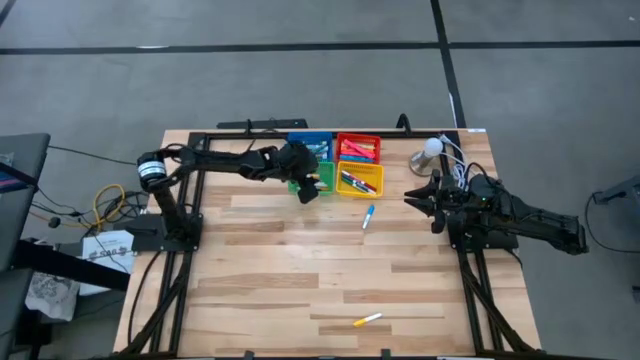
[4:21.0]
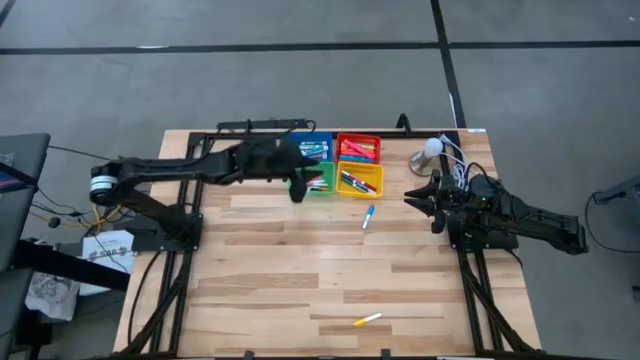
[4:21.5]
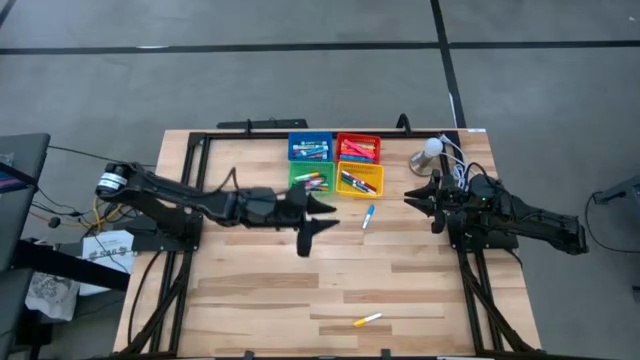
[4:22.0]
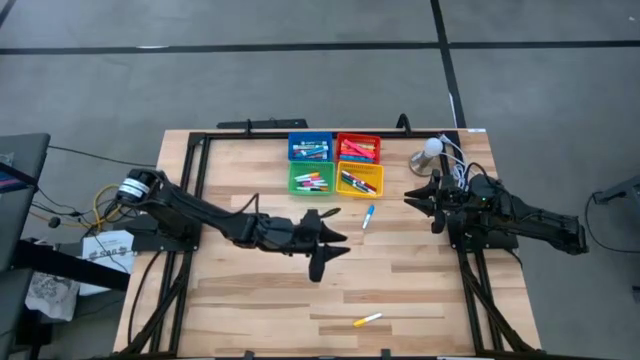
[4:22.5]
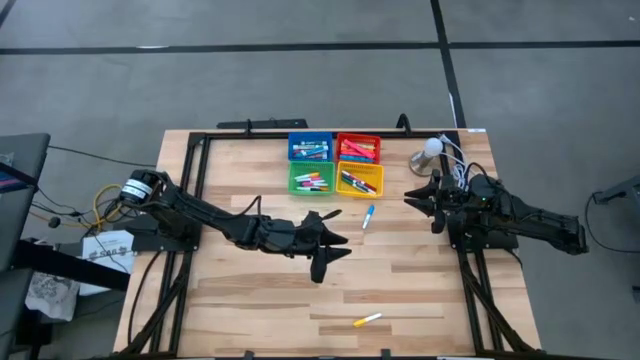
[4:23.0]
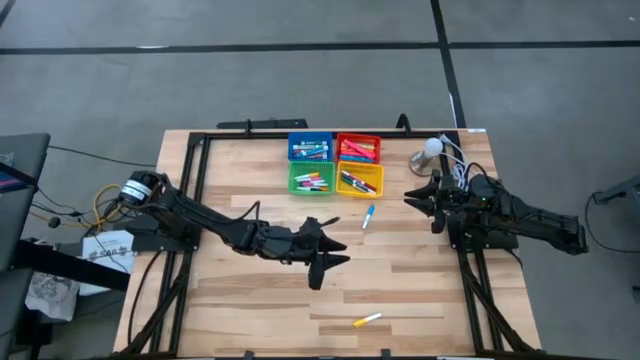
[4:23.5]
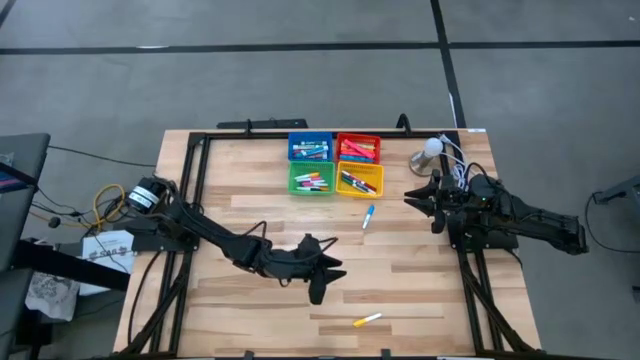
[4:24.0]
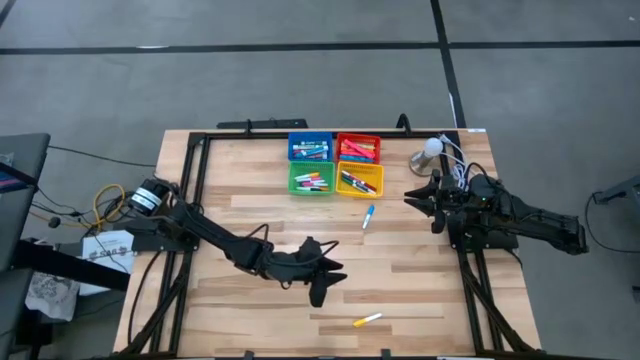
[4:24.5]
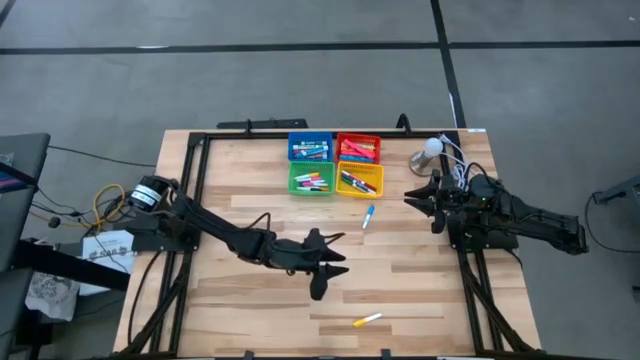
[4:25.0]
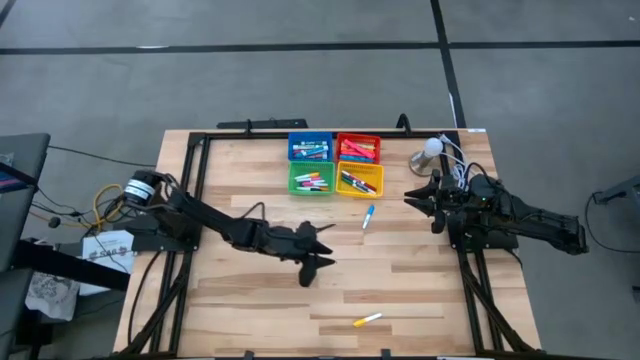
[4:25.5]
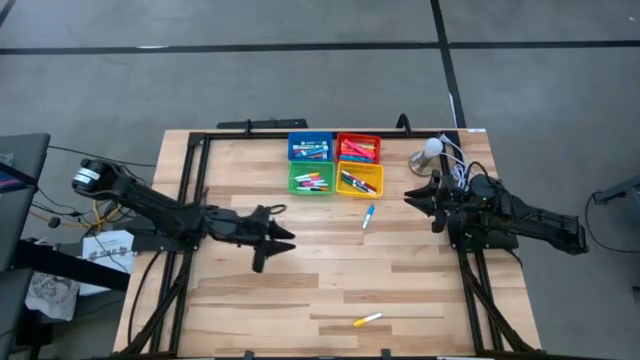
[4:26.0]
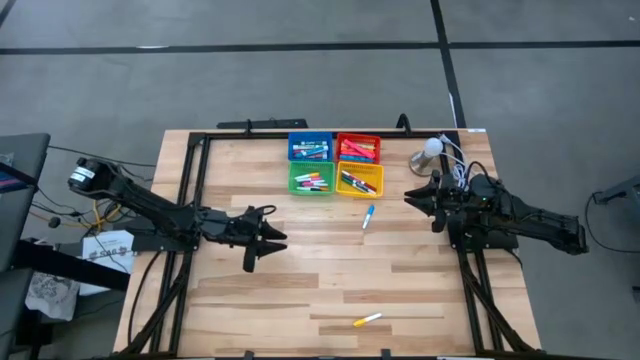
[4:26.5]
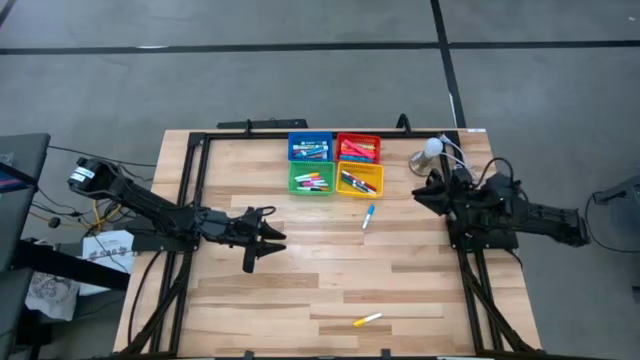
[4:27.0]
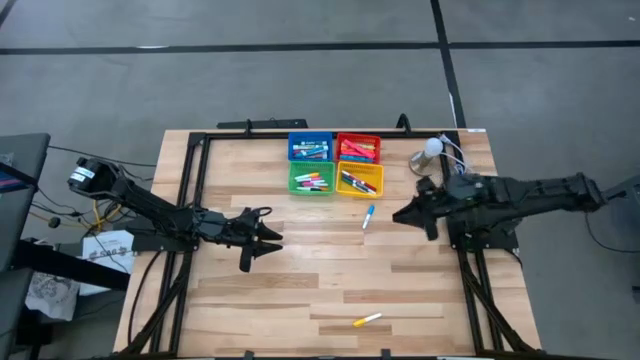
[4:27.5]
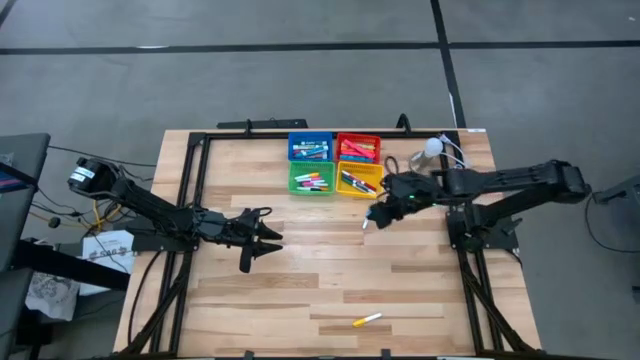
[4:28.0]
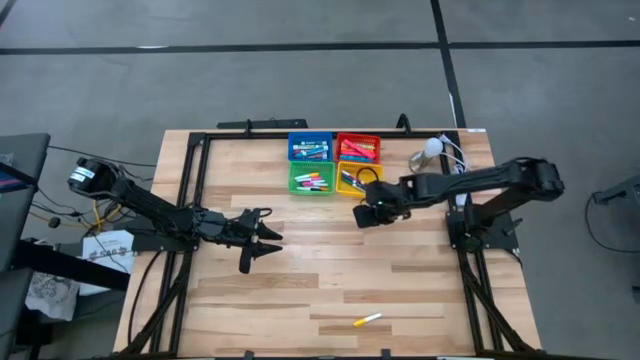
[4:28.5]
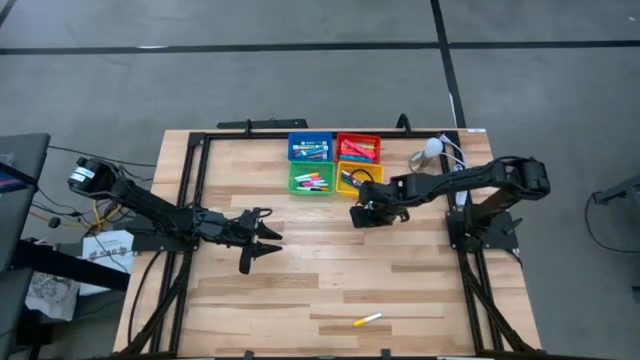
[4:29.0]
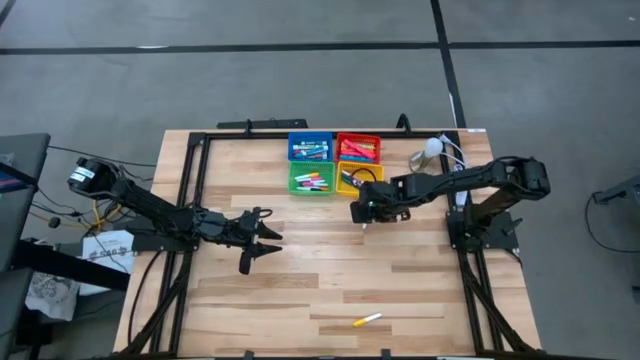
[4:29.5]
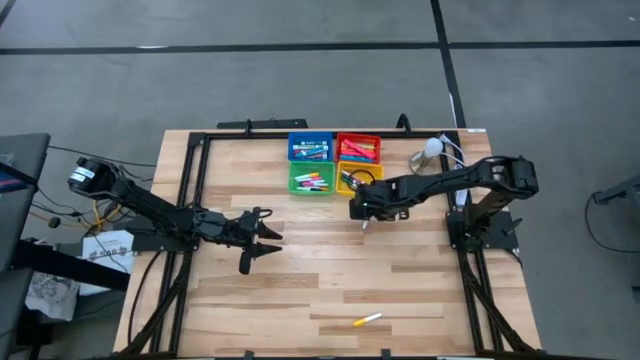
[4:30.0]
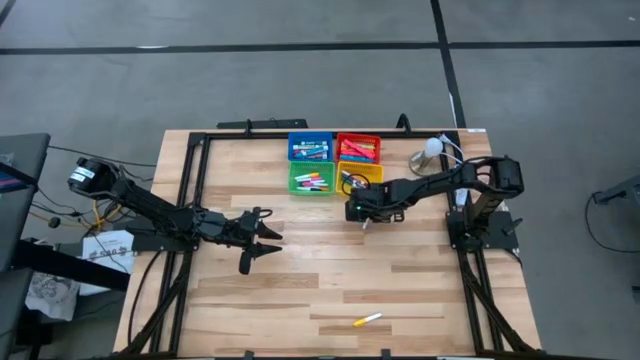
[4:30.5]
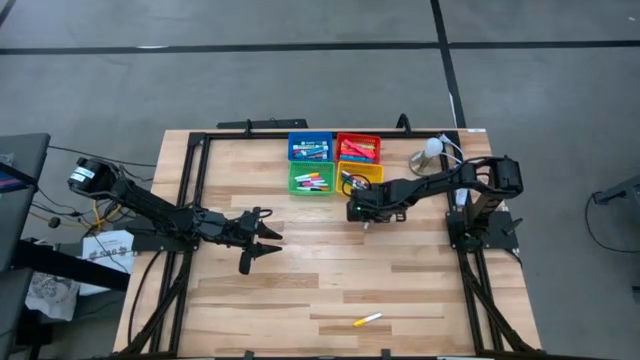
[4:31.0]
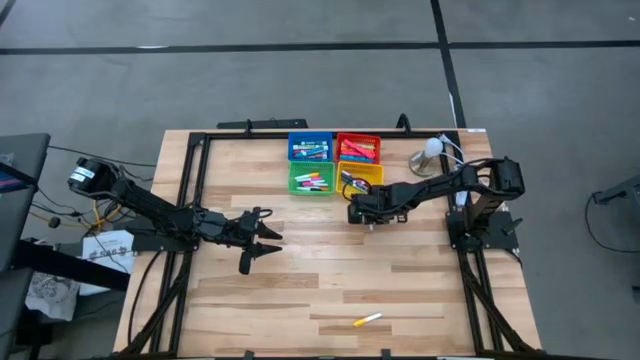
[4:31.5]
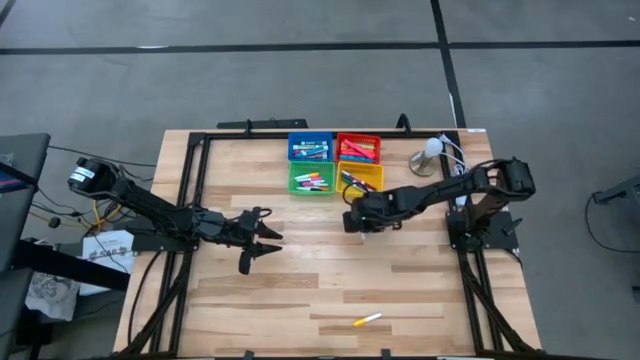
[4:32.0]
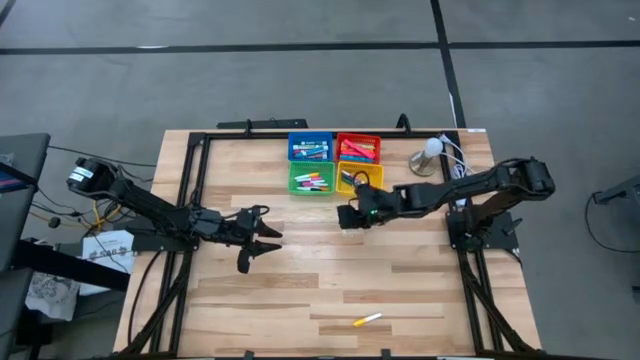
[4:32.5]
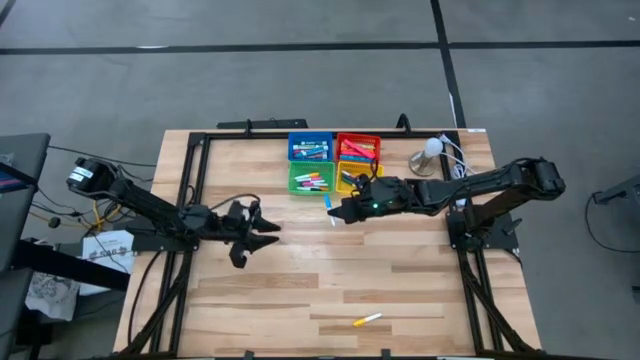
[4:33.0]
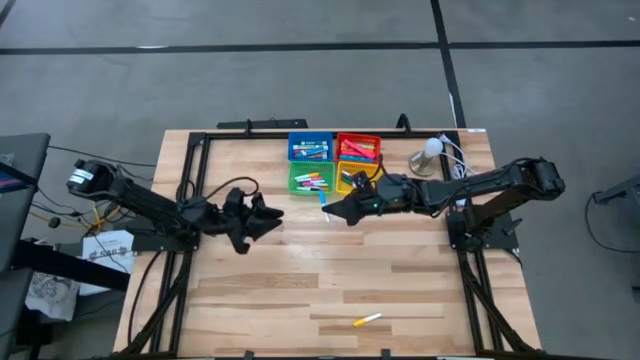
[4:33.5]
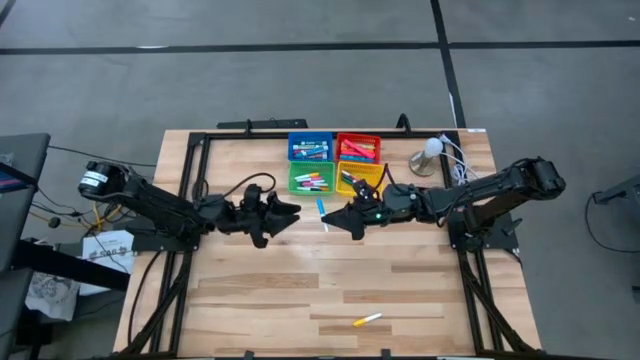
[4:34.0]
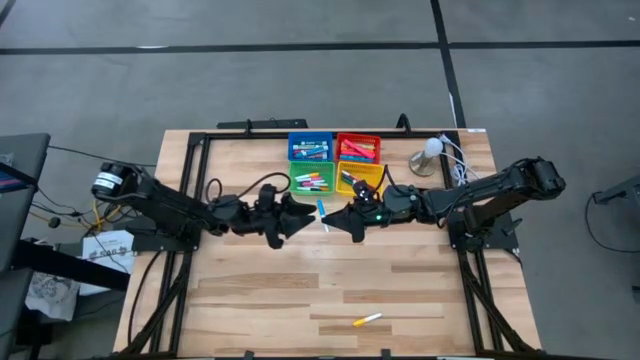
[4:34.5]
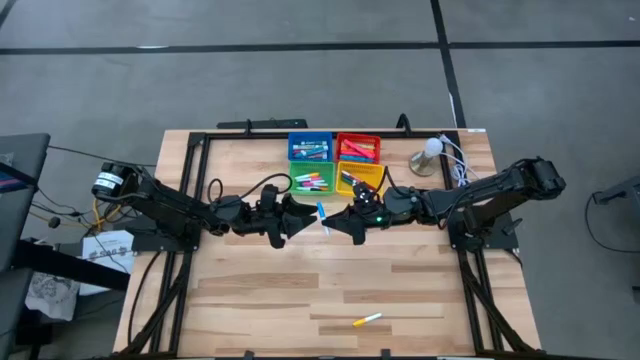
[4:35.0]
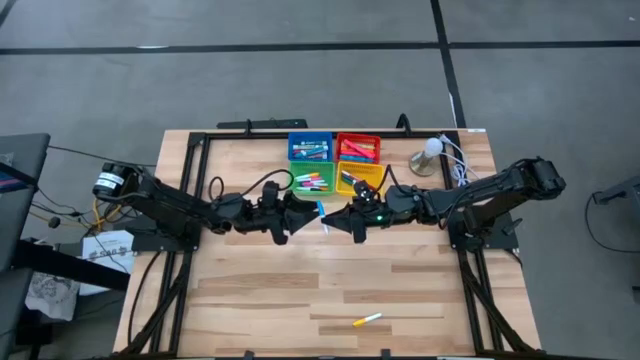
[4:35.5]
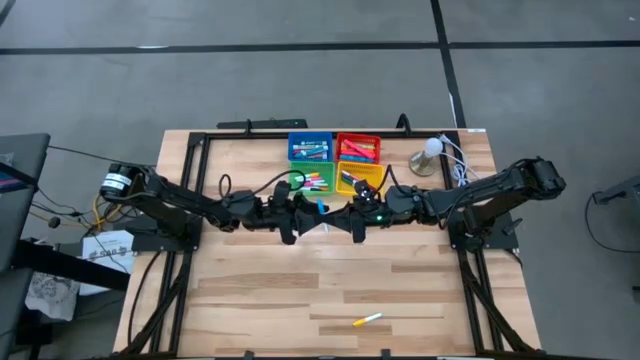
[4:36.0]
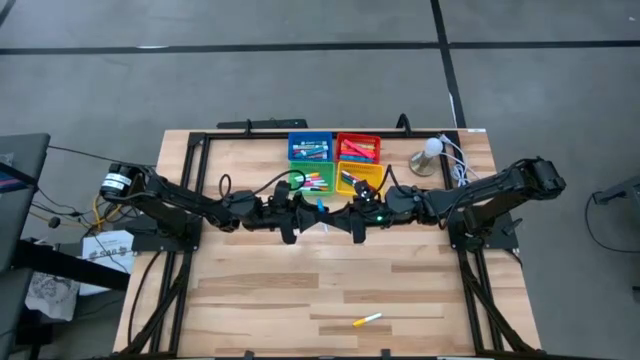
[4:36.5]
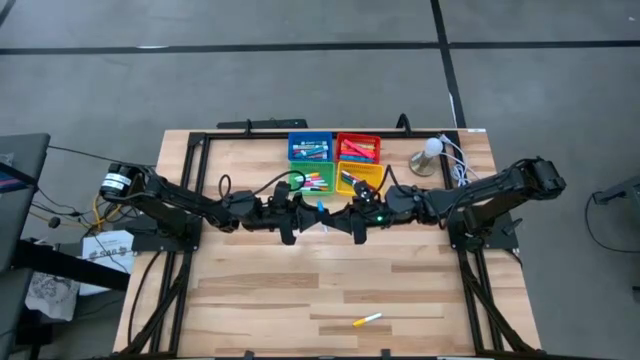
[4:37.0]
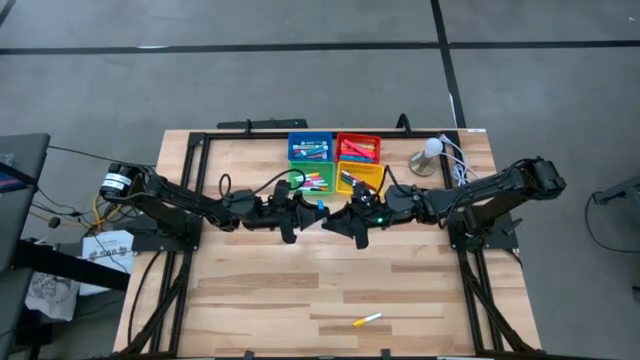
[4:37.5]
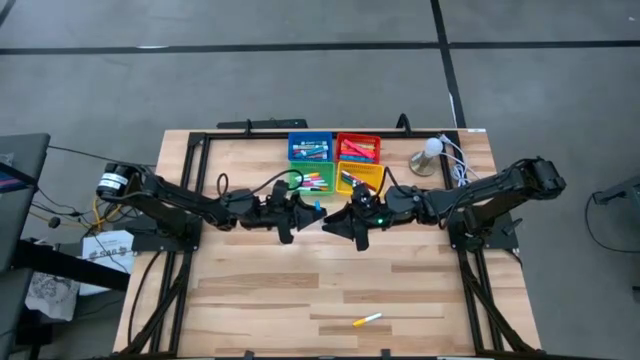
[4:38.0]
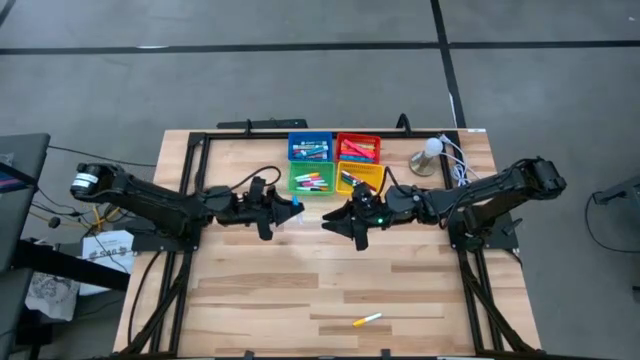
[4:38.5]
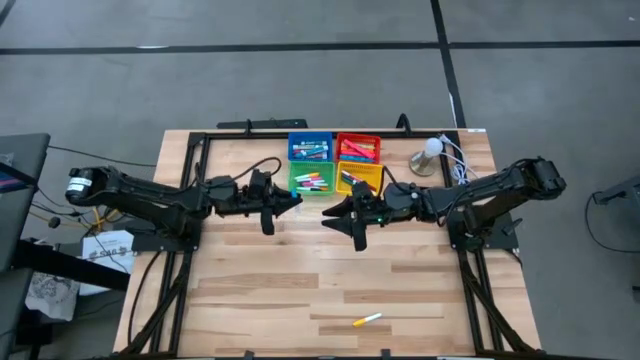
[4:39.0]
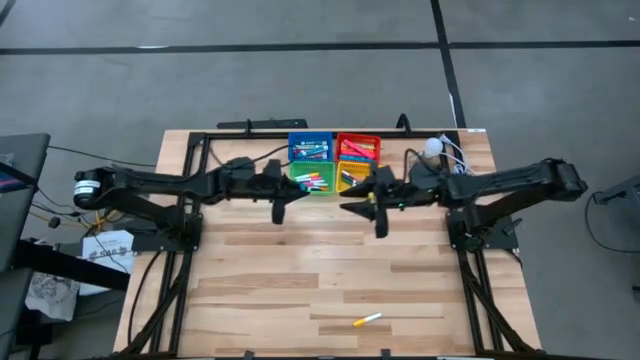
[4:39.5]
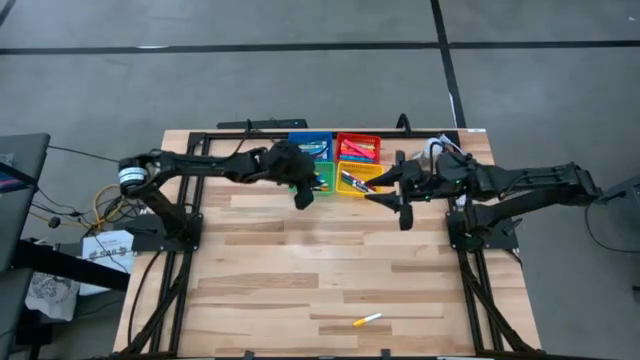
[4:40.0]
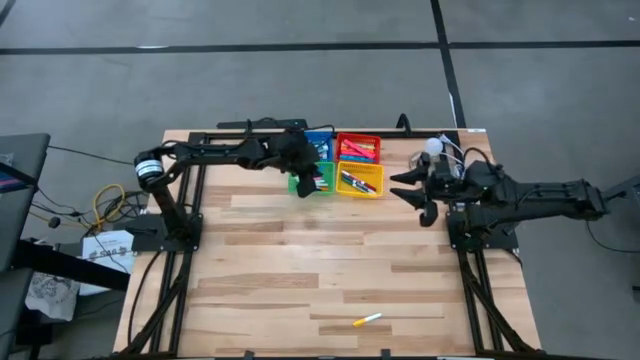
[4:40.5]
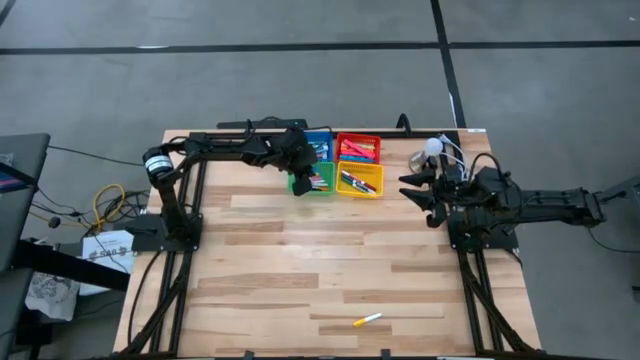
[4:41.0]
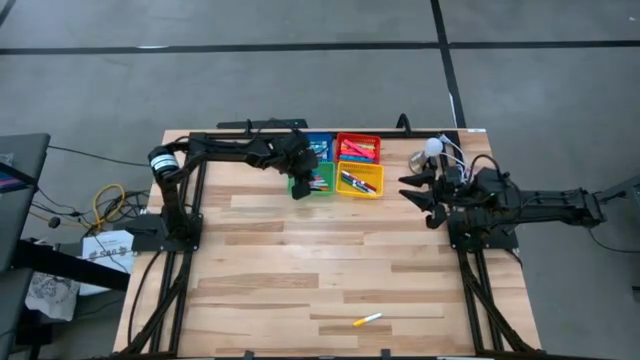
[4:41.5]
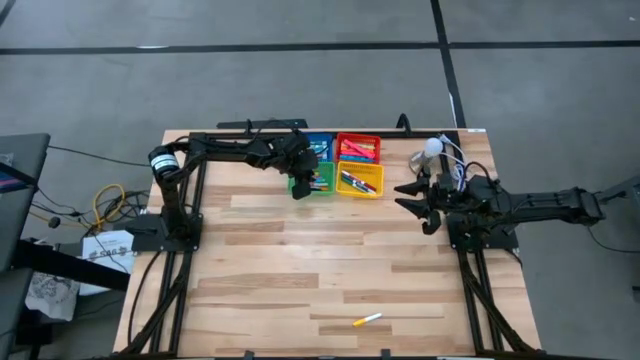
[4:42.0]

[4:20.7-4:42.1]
Task: Pick & Place Markers
Put the light blue highlighter in the green bin
